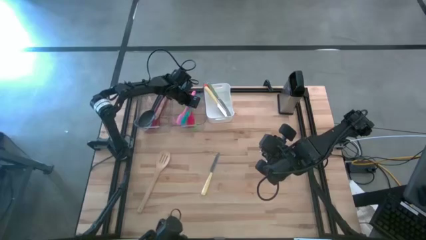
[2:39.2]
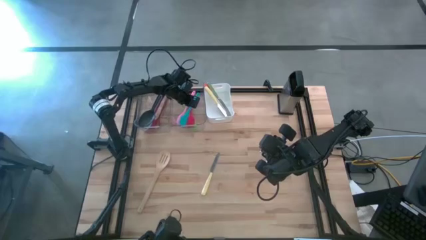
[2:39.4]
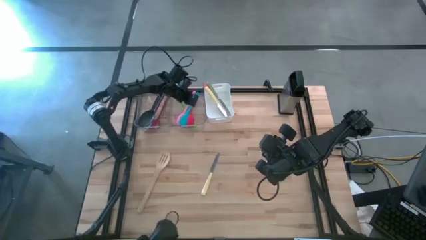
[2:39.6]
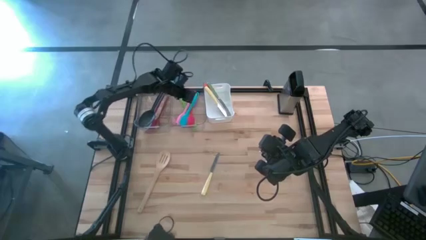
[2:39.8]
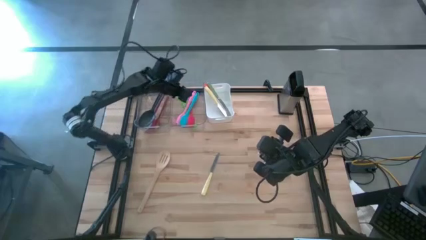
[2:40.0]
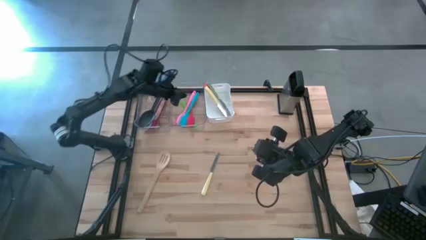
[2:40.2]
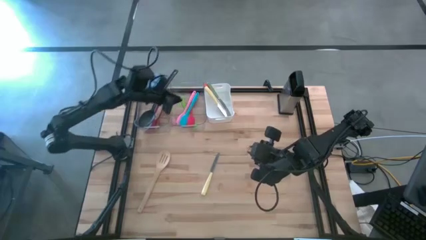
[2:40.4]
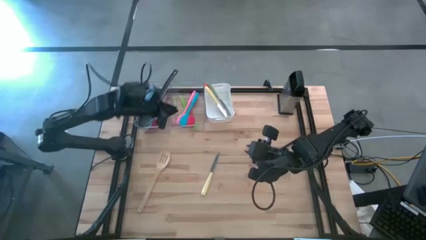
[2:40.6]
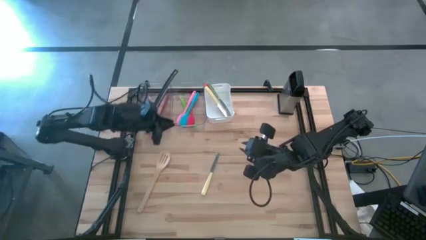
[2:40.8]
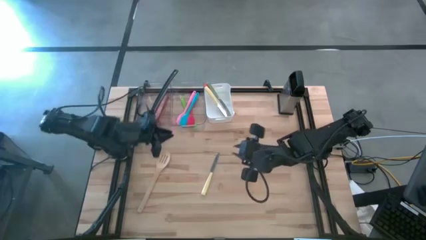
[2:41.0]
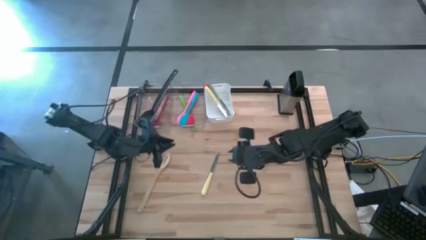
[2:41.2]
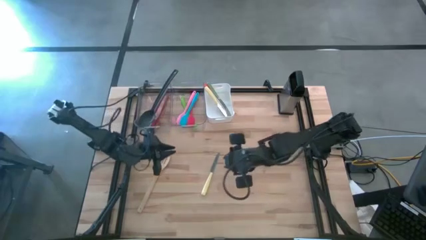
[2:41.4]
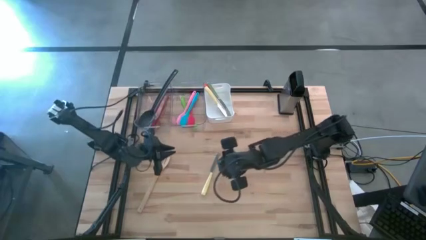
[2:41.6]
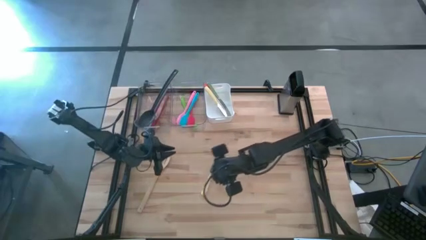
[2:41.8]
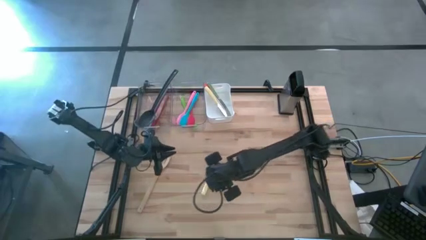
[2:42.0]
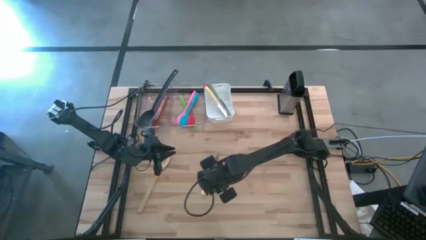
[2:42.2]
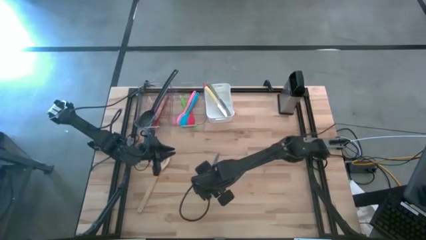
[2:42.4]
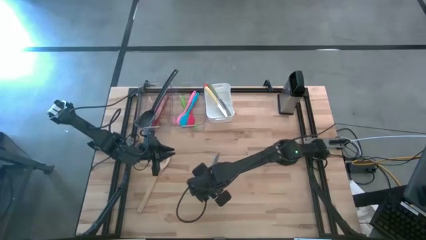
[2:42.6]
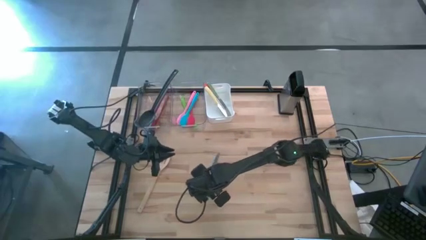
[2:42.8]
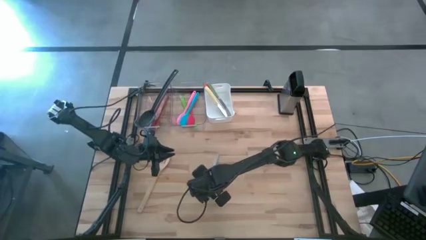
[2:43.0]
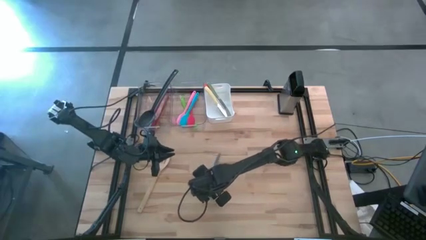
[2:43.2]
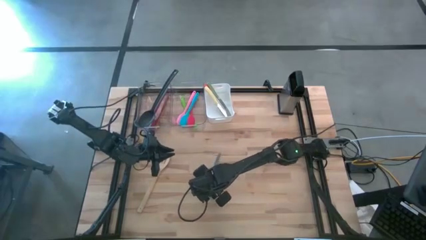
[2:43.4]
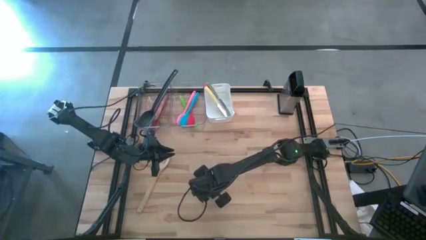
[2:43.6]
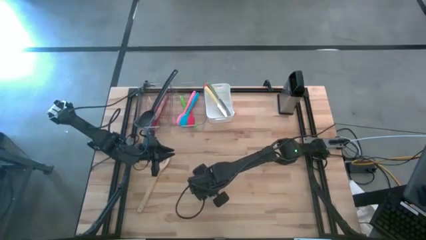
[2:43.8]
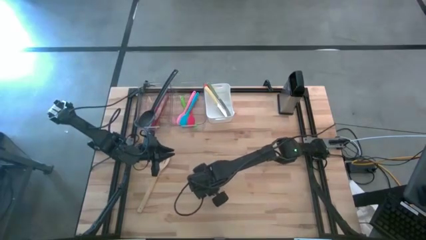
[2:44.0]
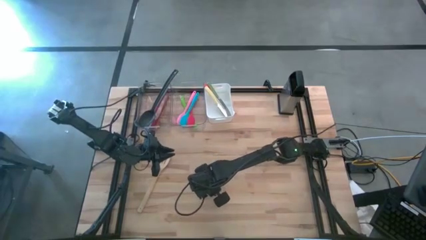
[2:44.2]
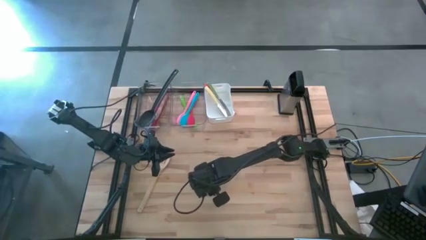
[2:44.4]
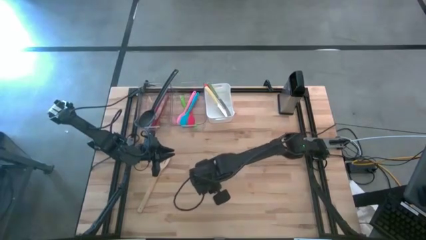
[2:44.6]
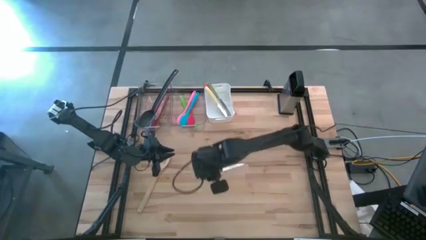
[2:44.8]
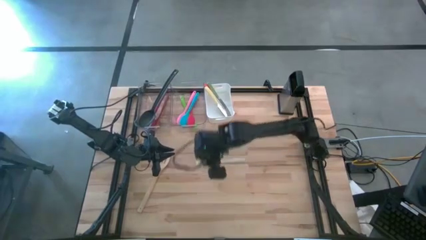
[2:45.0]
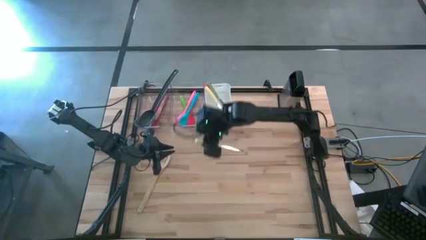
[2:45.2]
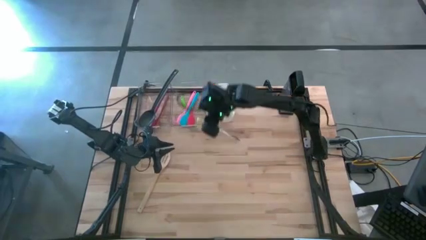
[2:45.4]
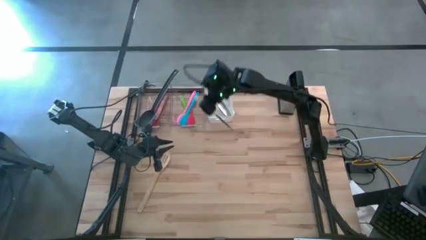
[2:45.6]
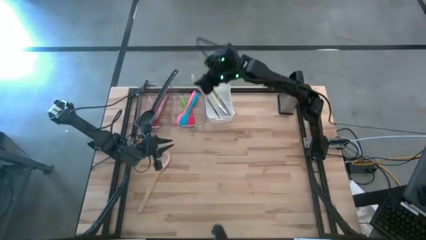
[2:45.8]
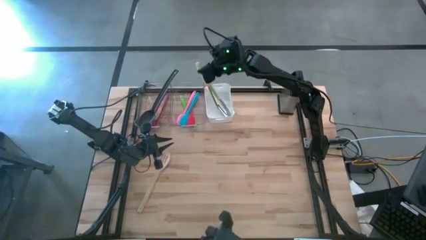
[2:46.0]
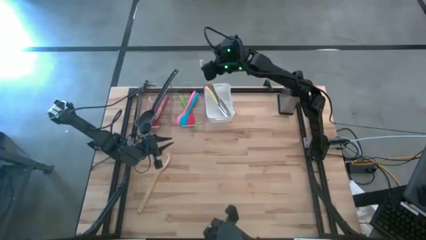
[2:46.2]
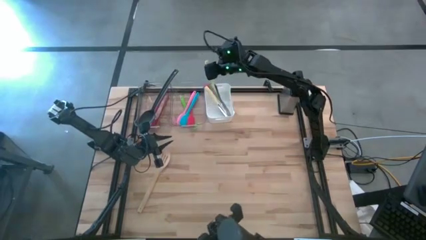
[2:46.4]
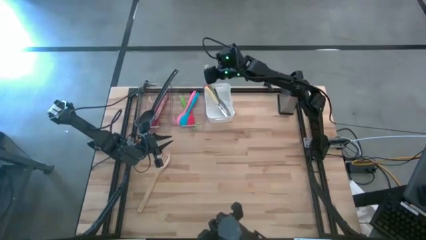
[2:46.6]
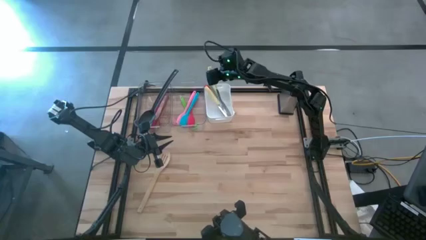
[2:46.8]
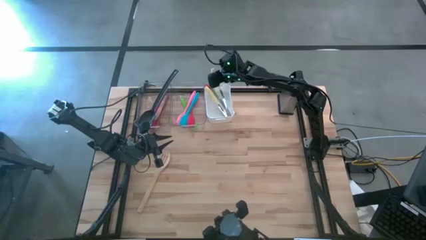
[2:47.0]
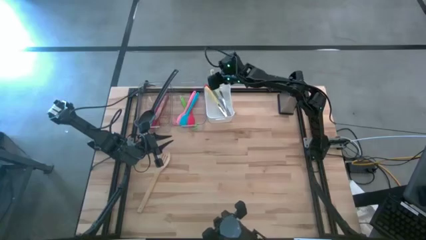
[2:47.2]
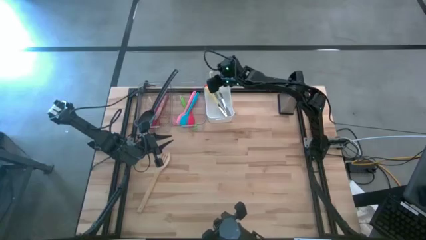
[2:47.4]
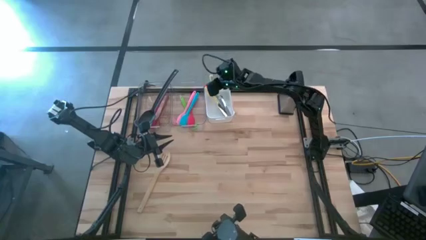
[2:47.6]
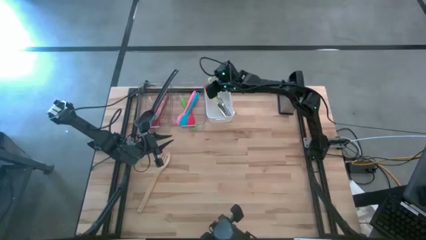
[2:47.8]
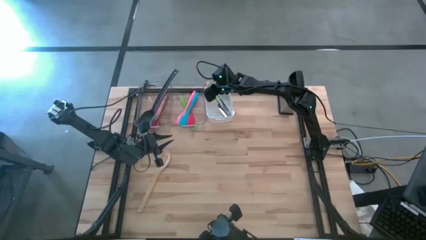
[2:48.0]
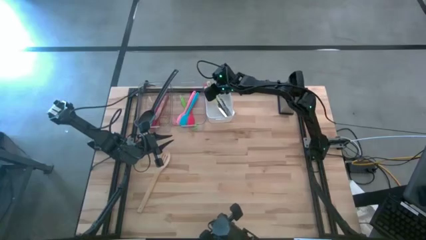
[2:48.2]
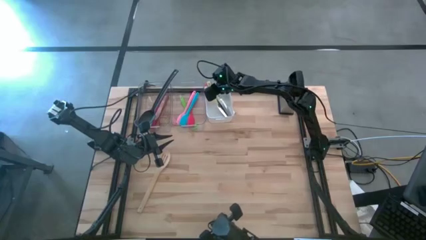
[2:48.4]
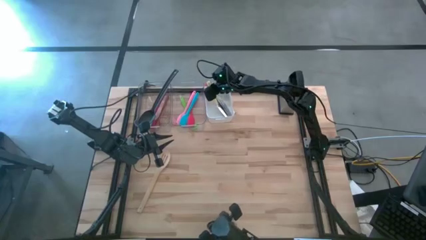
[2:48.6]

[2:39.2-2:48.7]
Task: Pick & Place Kitchen Items
Put the yellow table knife into the white bin

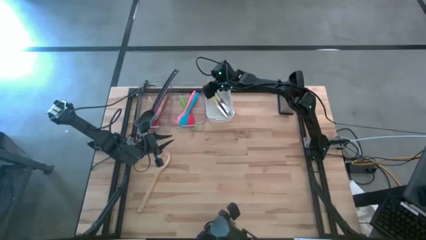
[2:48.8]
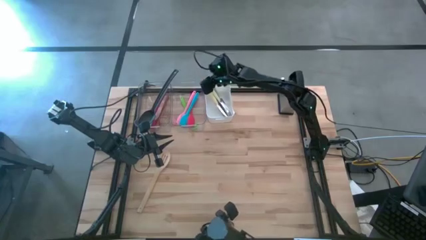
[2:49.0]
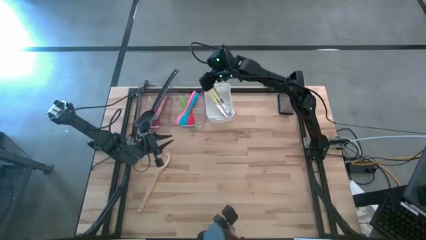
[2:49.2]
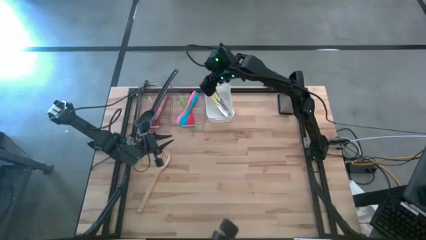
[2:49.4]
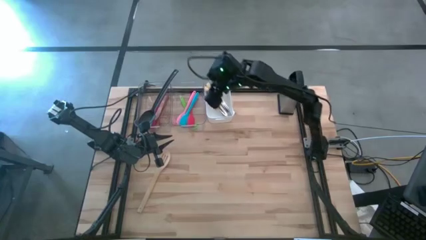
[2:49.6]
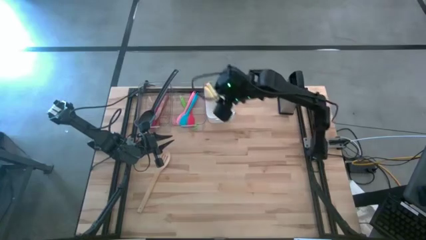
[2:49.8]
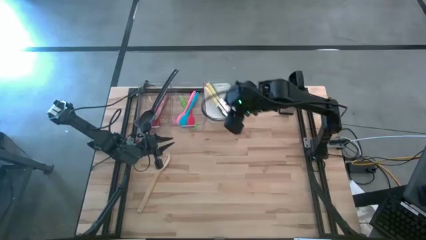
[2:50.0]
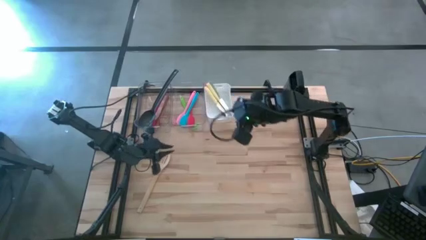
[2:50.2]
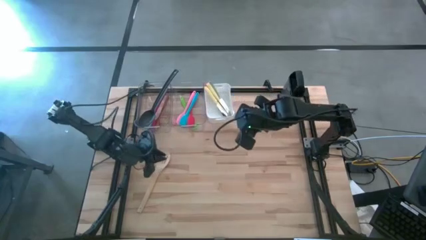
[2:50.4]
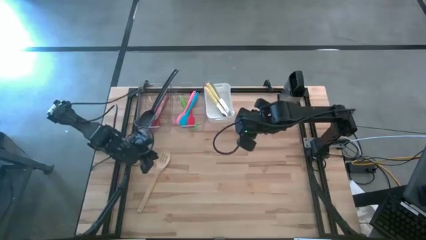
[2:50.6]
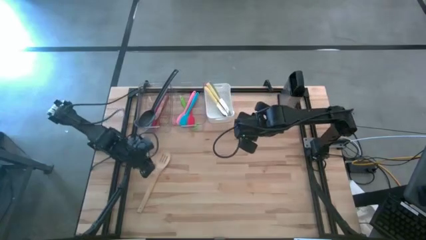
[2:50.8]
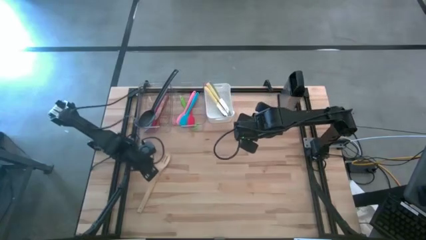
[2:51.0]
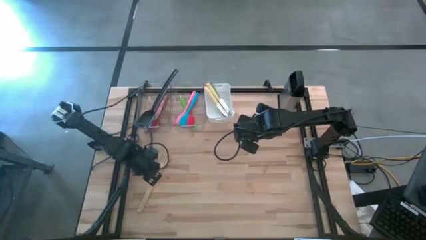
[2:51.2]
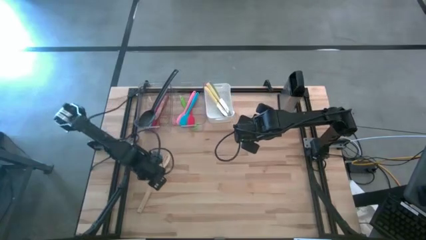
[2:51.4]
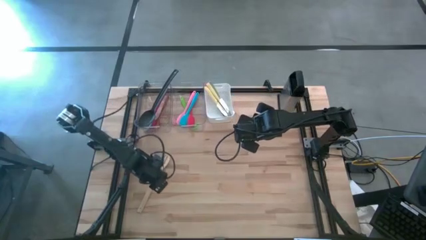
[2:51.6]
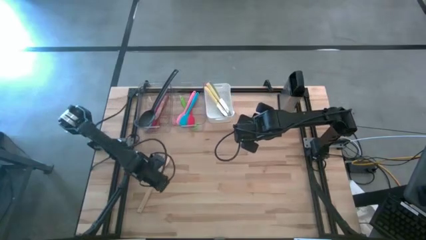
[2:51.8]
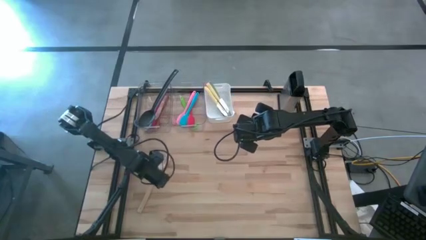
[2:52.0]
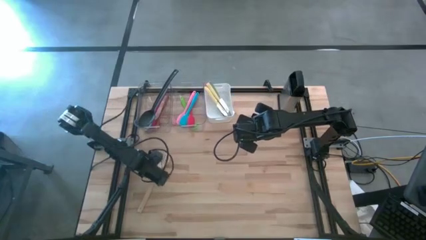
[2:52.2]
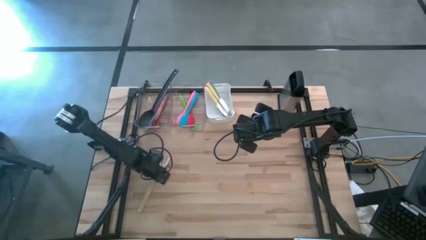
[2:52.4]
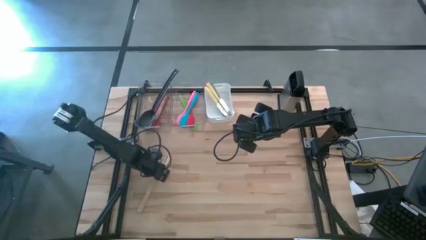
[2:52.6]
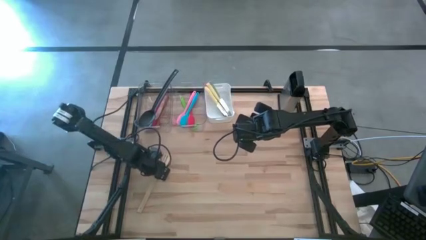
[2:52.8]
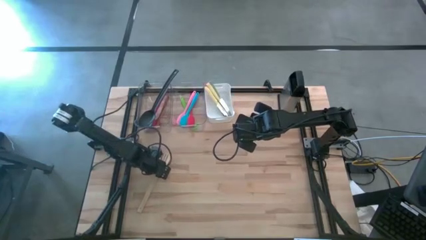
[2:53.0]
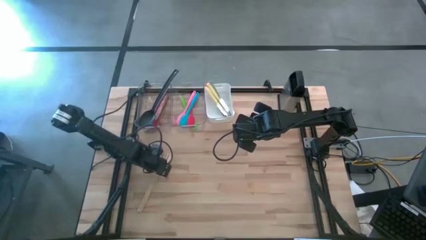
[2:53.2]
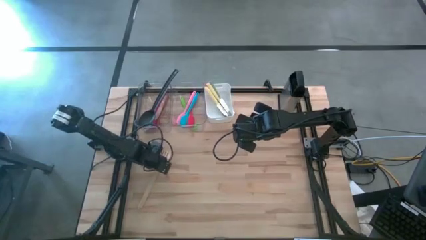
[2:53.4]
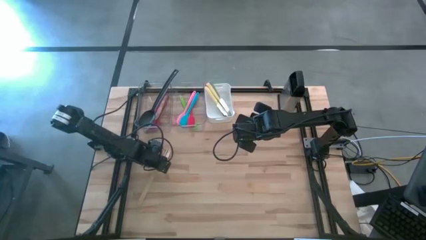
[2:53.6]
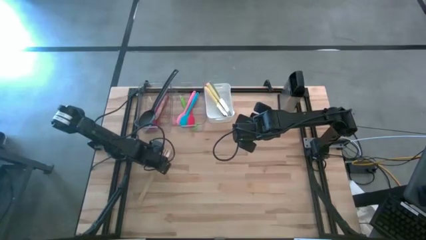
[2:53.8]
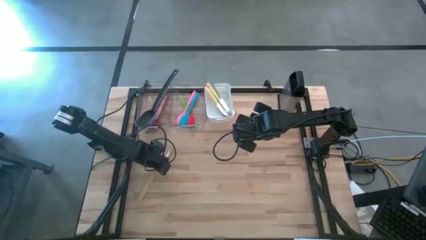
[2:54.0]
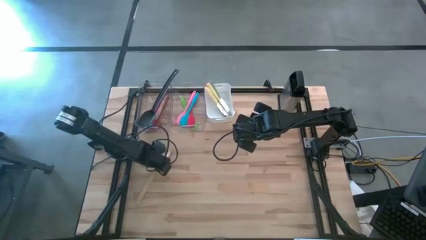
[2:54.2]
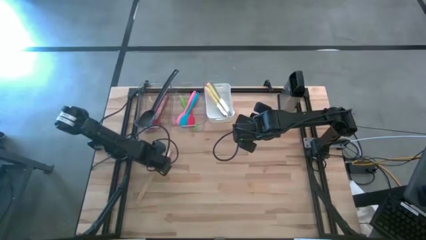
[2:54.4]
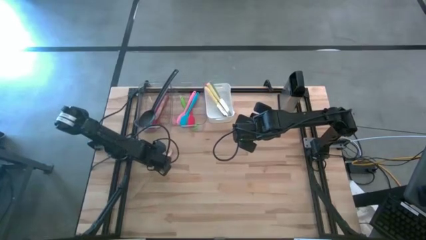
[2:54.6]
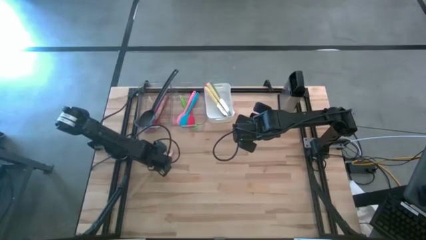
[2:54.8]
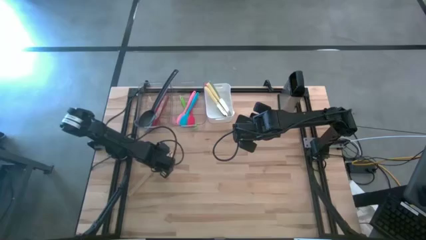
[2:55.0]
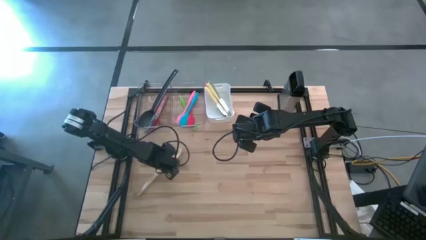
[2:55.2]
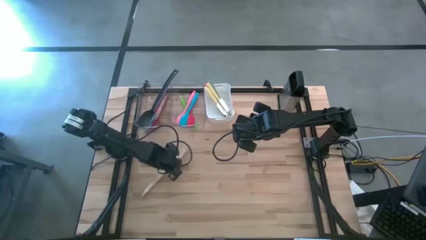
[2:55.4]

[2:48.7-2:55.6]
Put the light brown serving spoon into the left transparent bin
